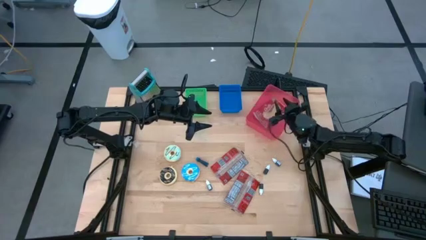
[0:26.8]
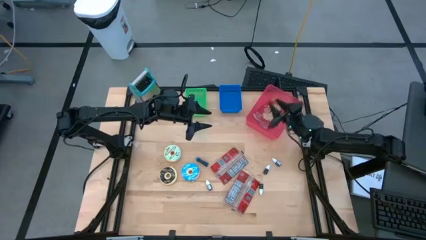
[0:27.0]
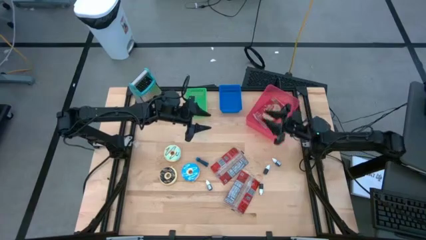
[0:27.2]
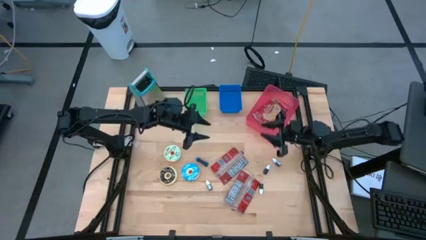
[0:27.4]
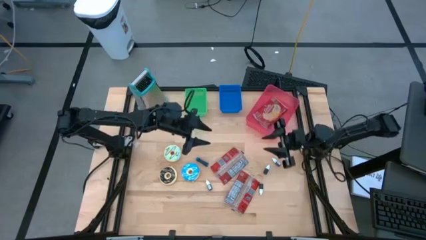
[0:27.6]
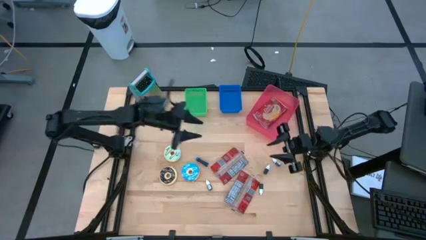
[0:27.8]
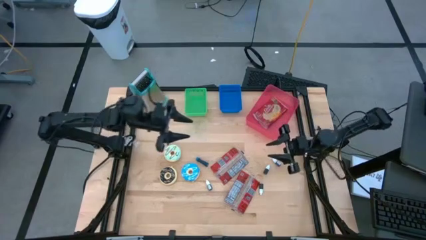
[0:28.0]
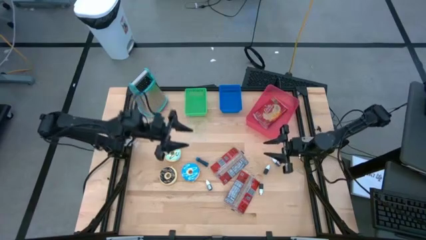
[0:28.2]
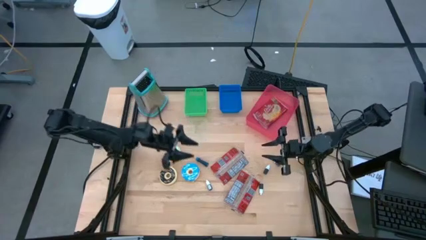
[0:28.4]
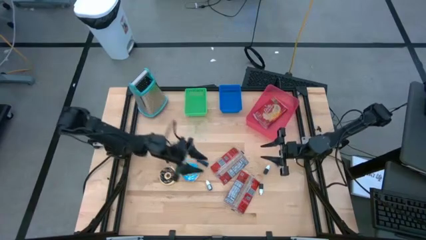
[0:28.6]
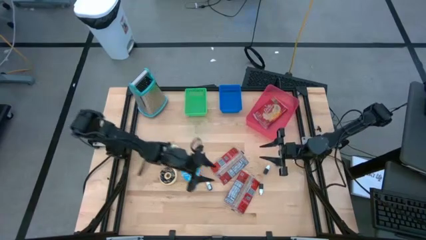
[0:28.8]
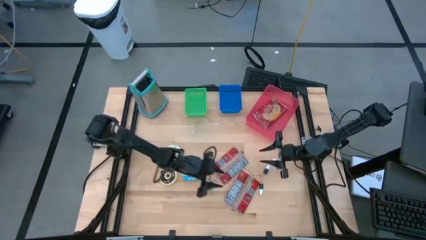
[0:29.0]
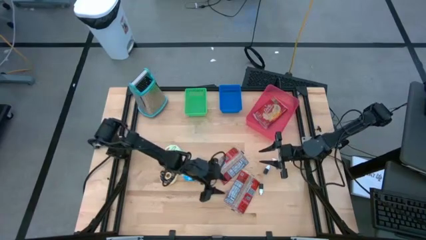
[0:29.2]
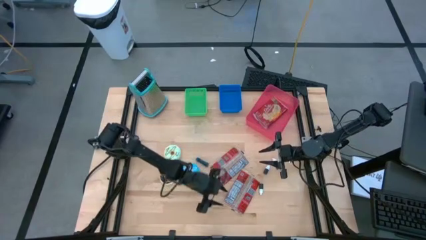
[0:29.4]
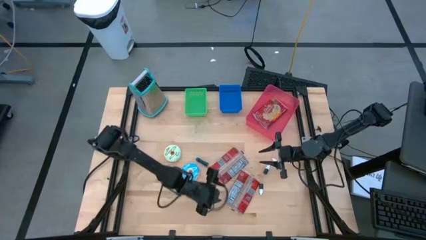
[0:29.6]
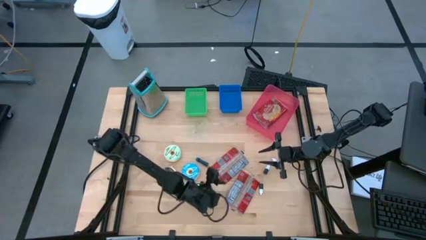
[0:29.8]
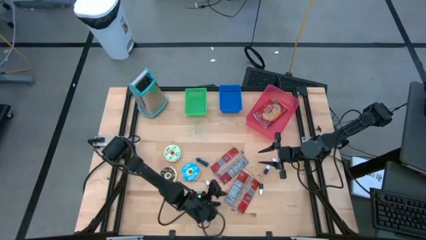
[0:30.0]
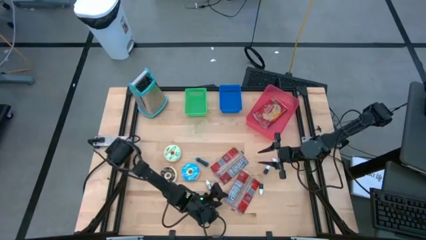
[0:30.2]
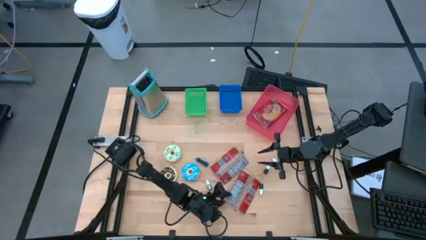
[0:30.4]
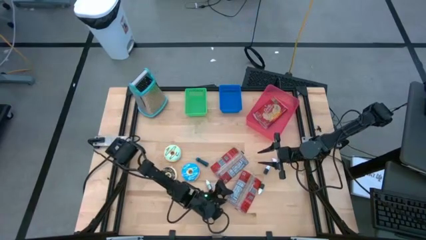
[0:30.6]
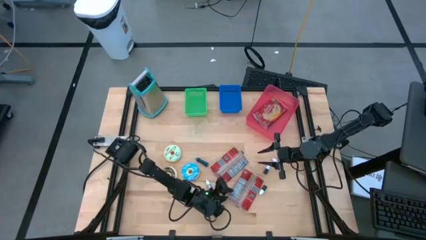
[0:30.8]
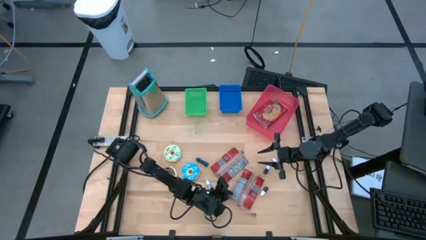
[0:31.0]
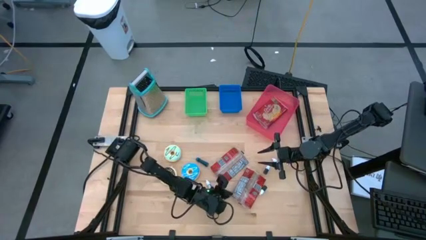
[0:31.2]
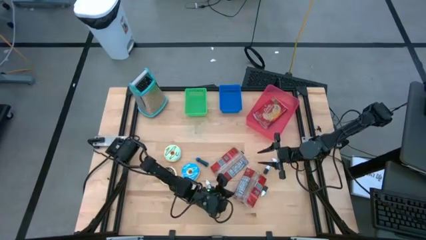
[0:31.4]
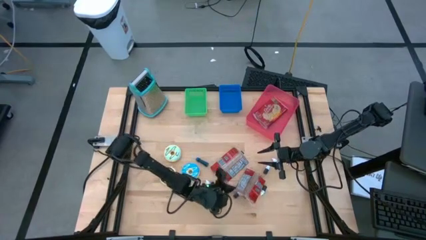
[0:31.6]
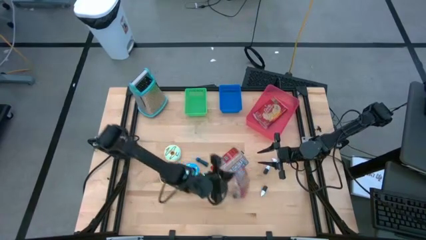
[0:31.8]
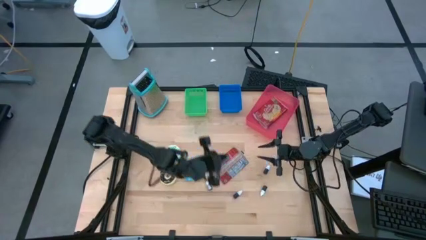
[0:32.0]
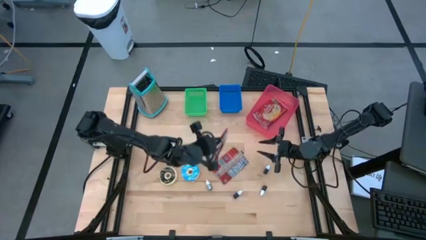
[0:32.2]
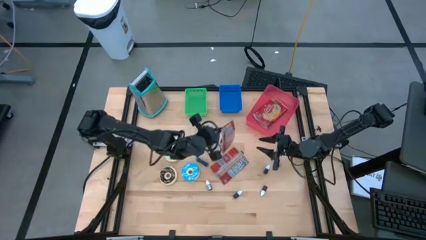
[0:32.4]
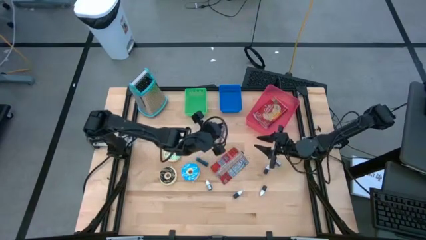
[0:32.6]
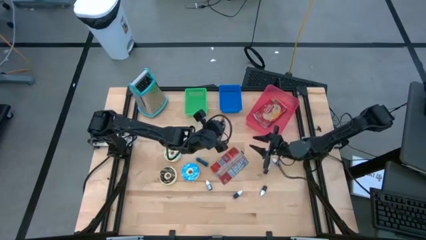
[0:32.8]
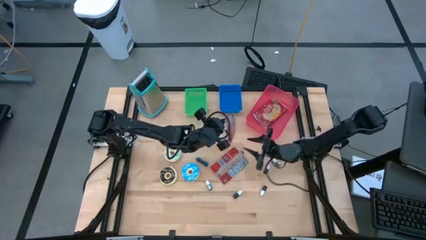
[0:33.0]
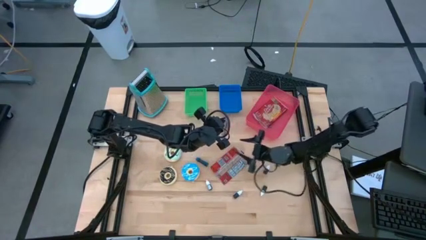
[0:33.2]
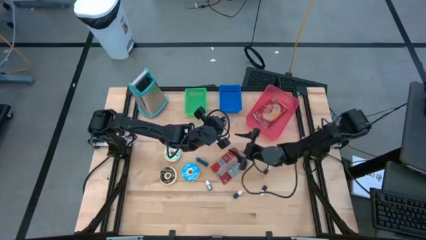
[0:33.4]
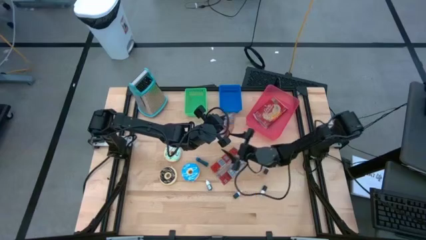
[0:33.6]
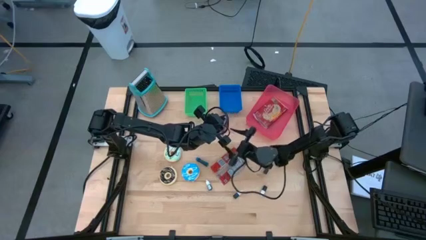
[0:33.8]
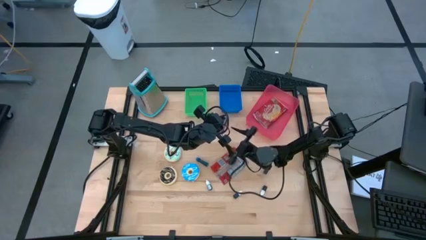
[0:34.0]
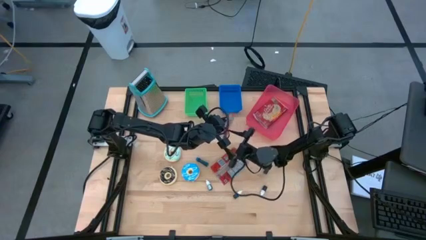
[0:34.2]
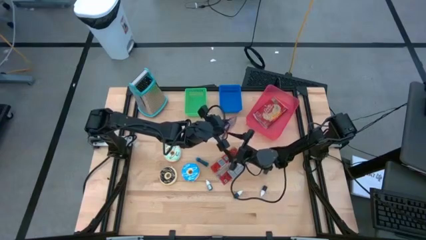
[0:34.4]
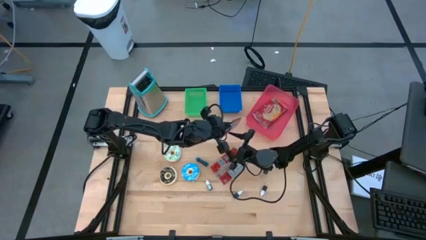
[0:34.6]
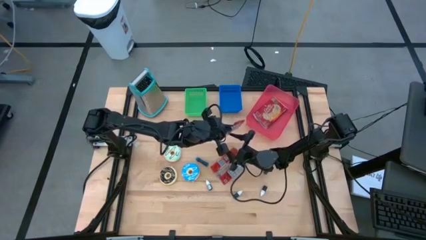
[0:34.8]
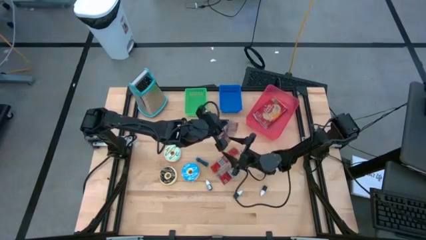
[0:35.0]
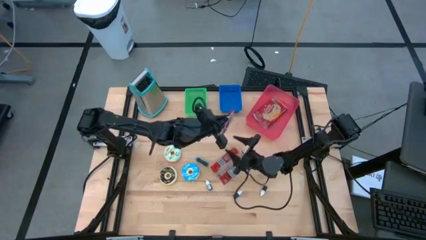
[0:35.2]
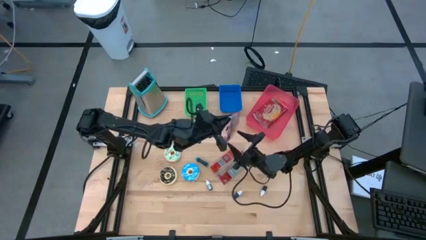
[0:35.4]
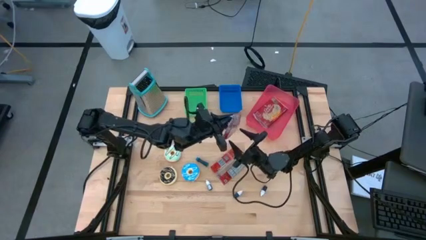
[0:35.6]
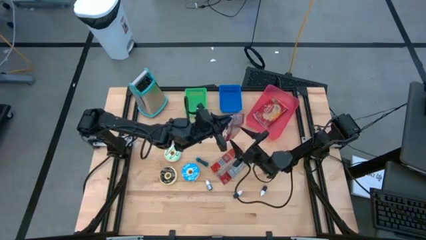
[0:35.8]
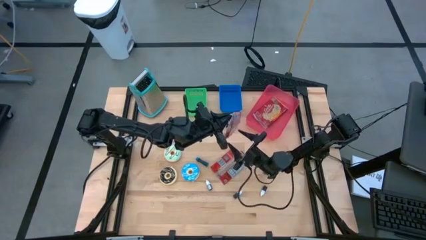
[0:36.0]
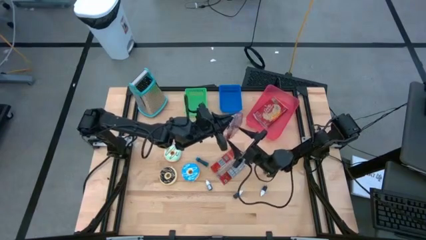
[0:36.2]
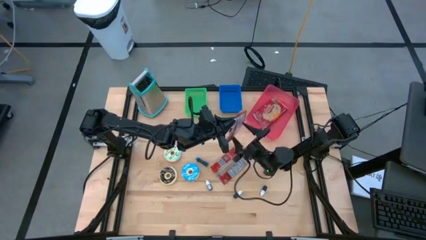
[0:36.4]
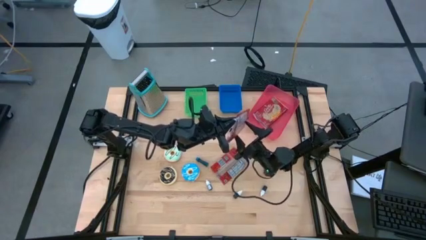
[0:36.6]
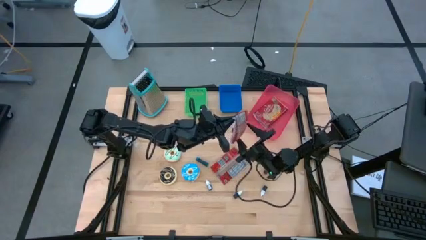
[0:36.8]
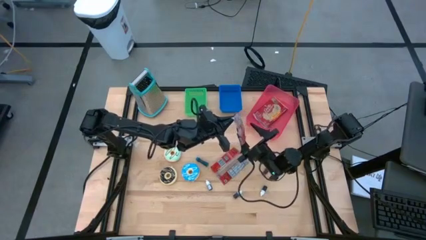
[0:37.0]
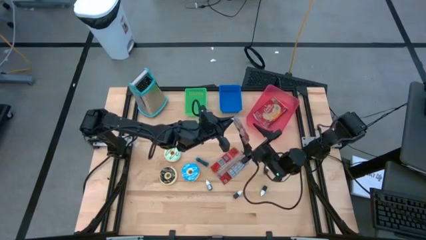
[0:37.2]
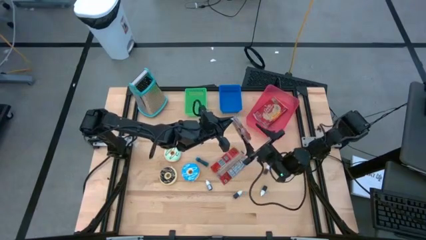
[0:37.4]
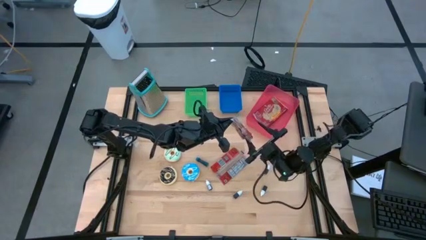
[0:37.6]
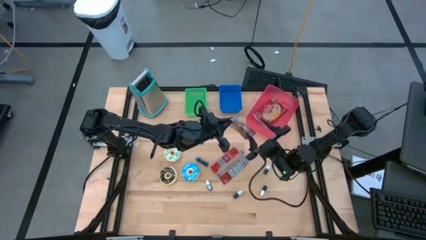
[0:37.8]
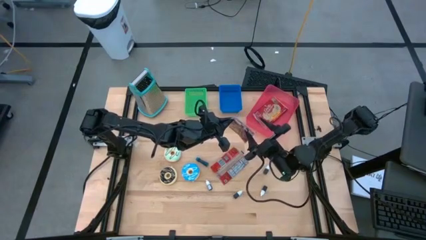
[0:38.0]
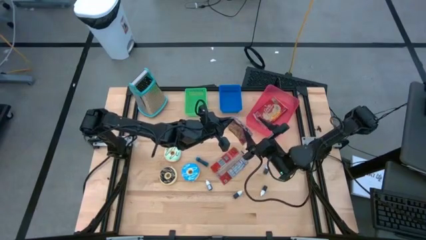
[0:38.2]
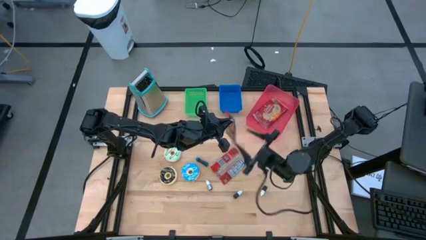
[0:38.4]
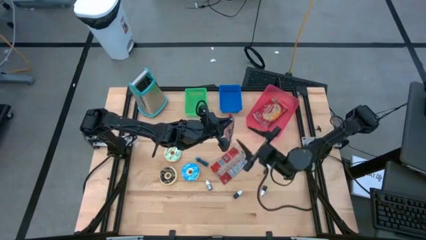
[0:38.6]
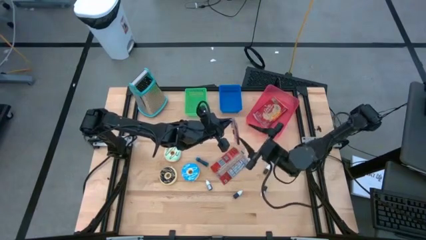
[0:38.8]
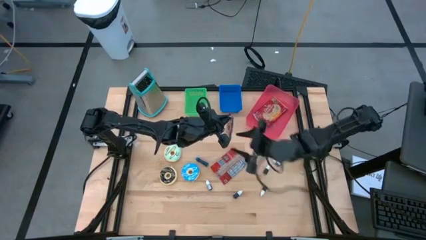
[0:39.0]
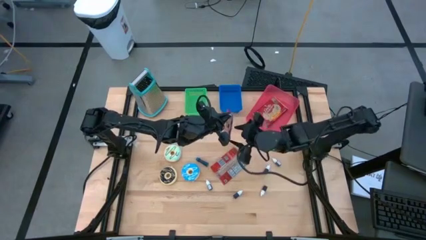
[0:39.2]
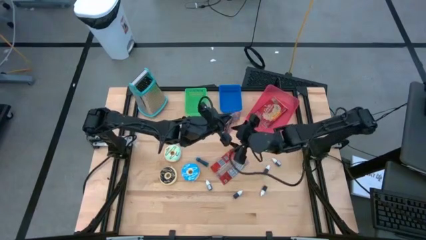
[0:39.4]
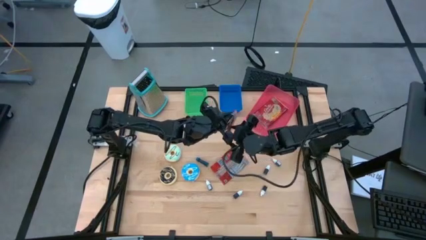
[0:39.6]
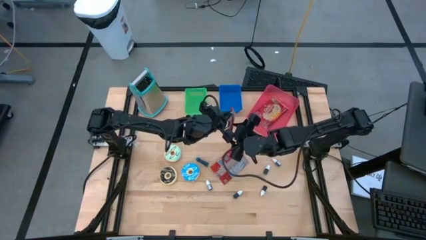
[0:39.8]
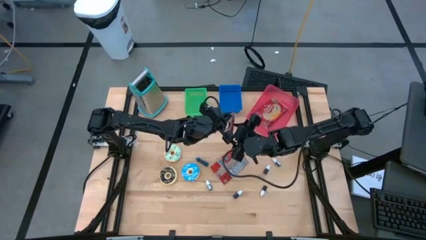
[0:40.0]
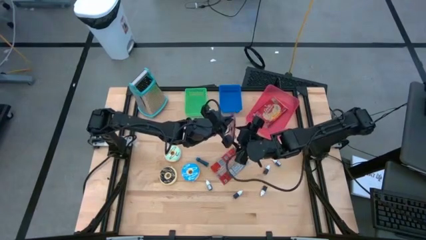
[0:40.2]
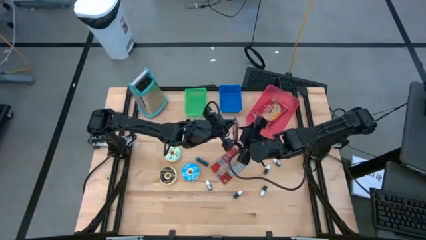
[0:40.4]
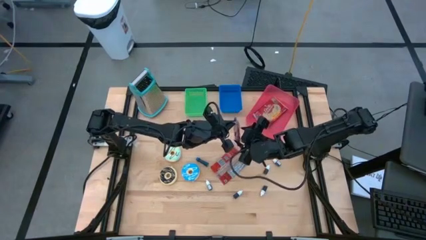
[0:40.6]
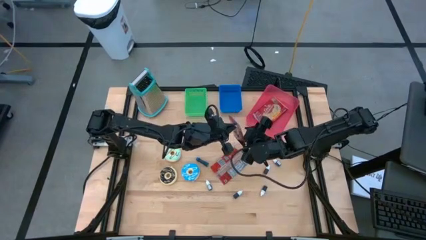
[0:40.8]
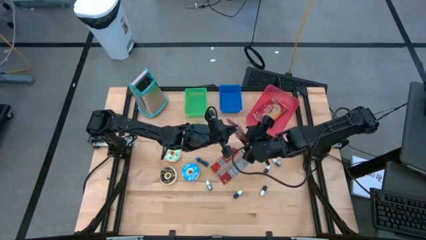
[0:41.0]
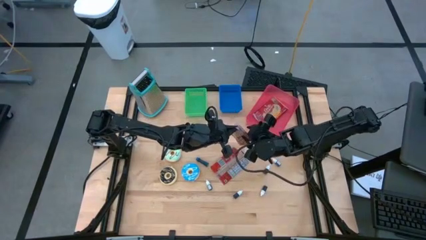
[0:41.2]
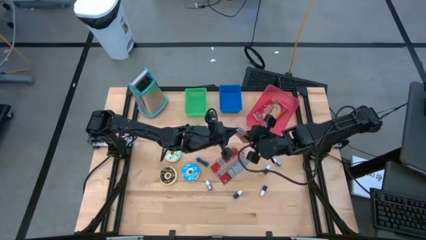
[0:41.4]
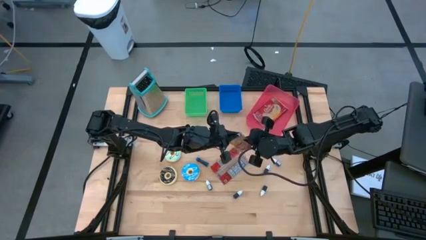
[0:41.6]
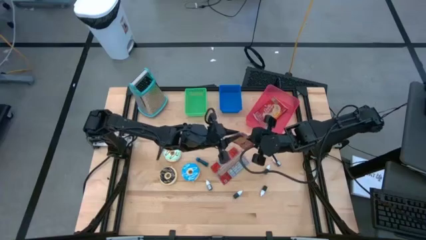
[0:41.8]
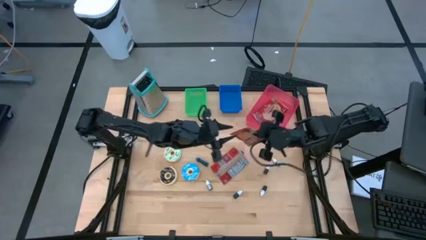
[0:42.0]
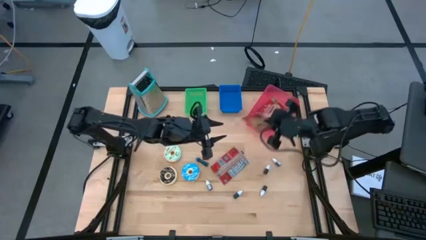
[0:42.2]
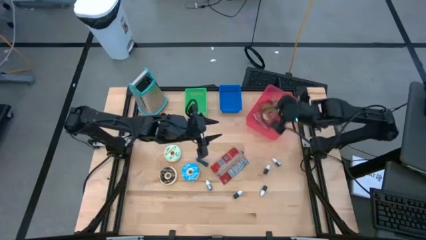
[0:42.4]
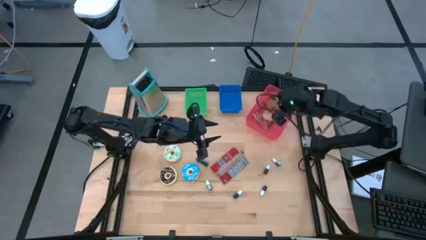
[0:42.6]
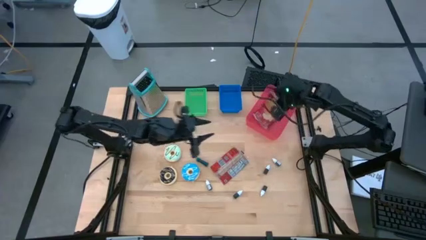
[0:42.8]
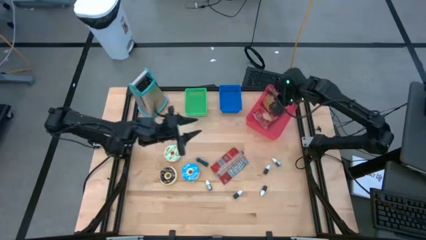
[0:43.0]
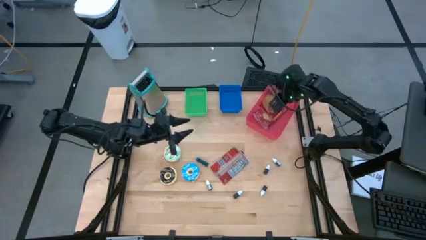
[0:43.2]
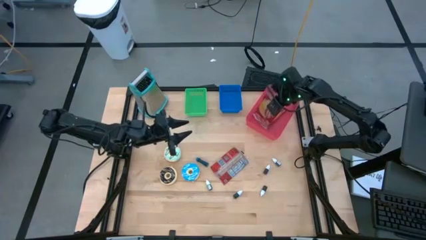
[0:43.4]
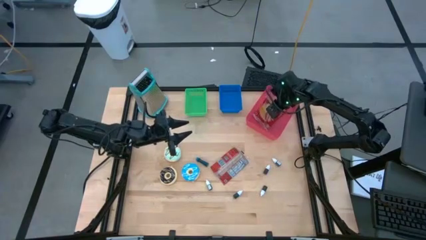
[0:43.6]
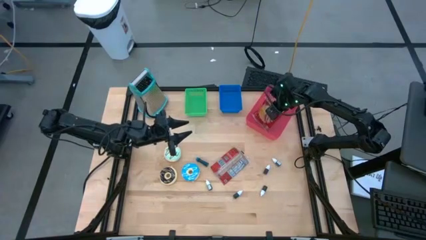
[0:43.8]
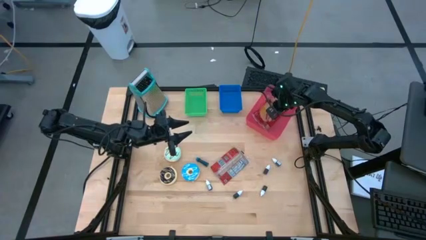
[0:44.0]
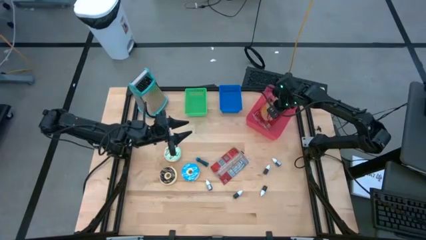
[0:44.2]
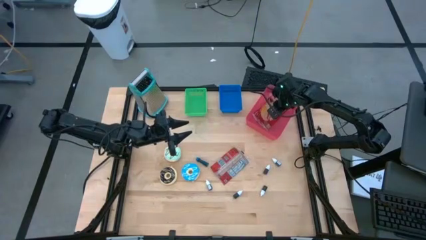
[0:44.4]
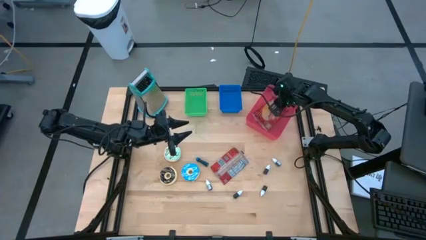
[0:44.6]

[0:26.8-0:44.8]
Stack the bottom red popcorn bag on top of the red popcorn bag in the pink bin
